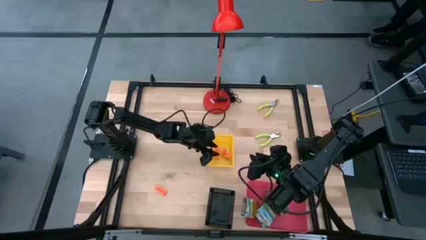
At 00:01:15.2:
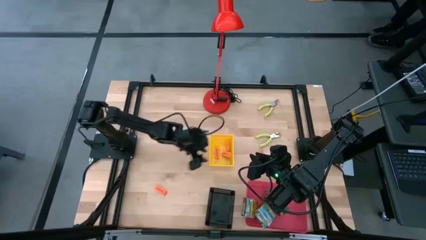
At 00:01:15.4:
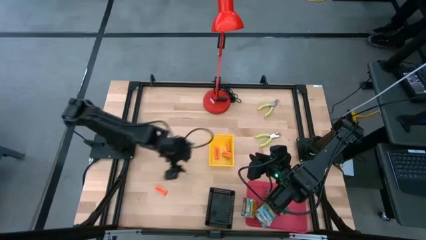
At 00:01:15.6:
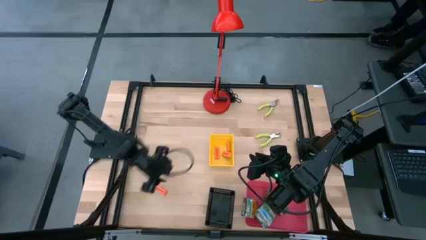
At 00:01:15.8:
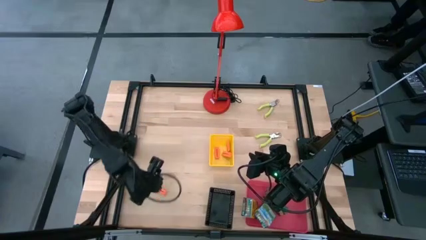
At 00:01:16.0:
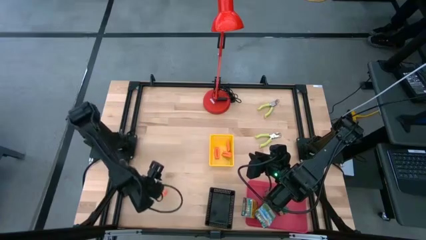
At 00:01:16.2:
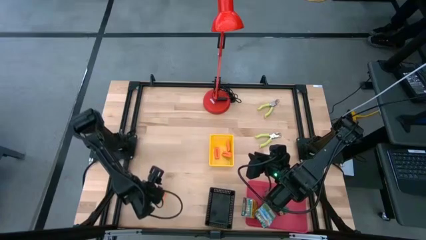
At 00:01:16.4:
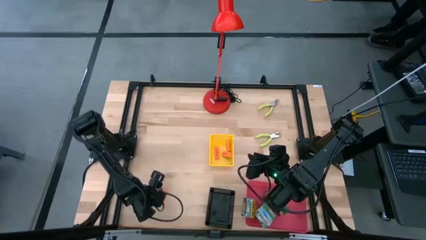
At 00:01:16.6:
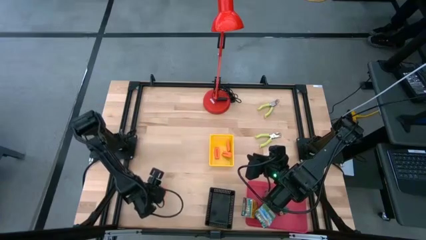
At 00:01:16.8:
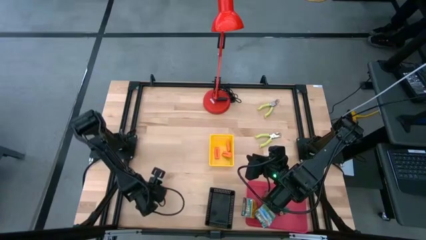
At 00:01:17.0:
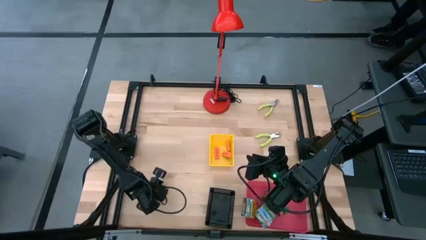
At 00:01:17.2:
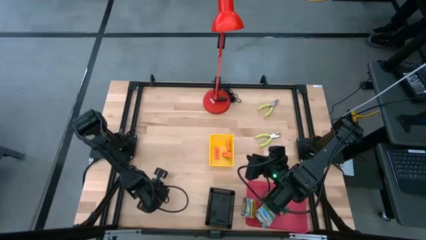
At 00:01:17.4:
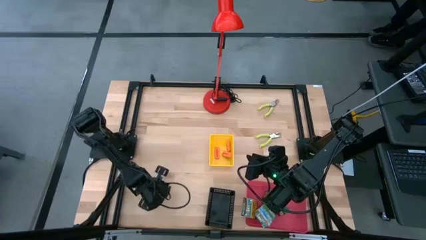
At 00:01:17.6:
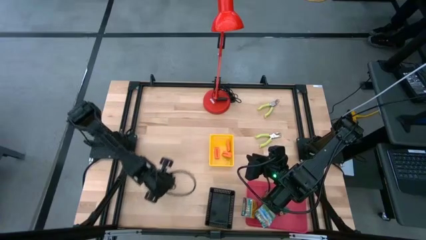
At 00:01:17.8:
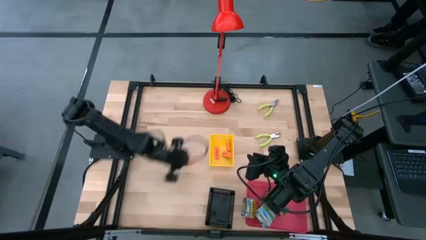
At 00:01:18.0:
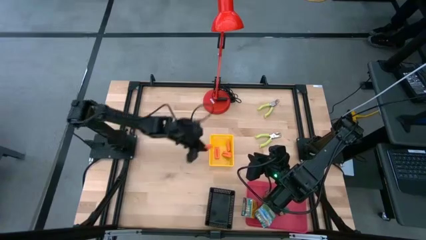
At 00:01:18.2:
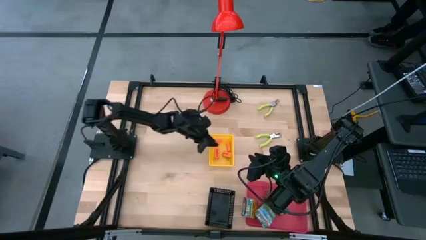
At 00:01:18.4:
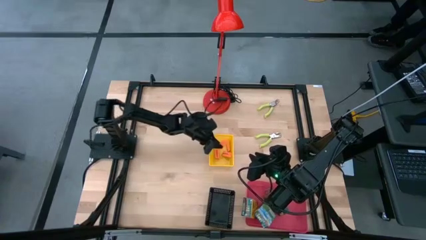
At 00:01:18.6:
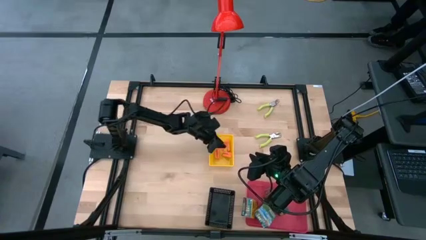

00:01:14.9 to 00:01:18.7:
Task: Pick & Place School Supplies
Put the orange eraser into the yellow bin

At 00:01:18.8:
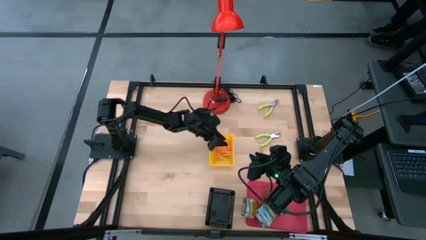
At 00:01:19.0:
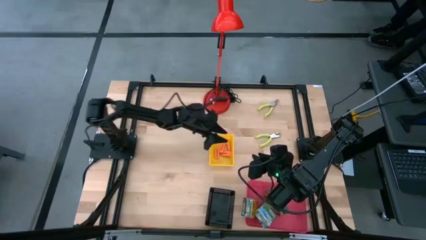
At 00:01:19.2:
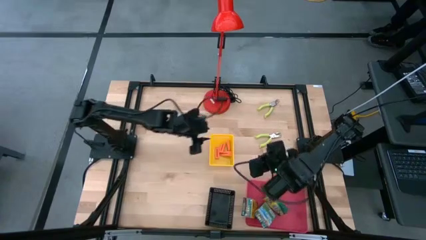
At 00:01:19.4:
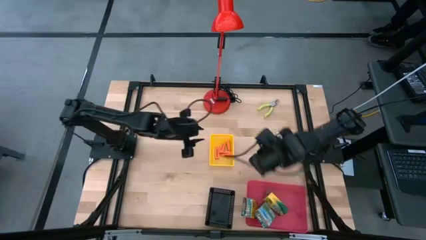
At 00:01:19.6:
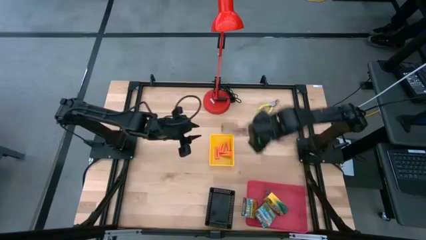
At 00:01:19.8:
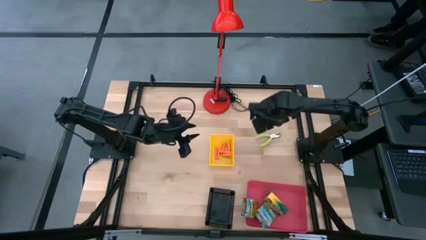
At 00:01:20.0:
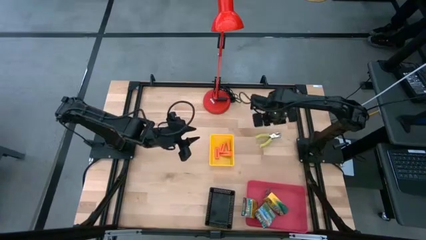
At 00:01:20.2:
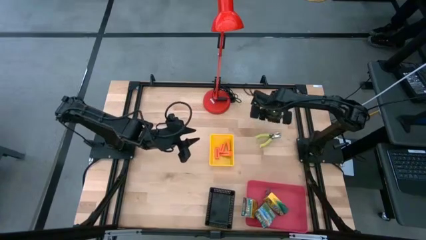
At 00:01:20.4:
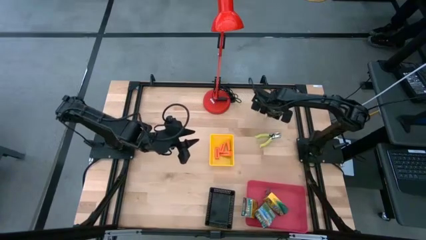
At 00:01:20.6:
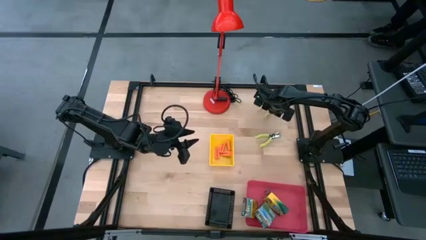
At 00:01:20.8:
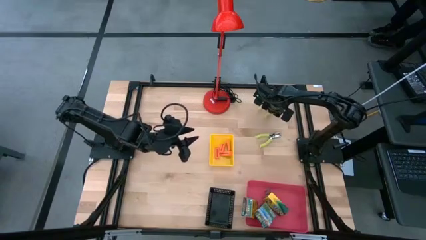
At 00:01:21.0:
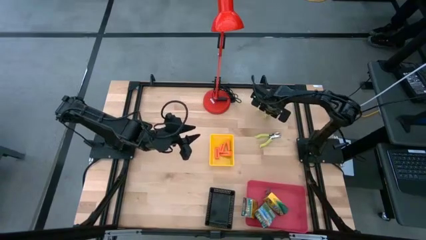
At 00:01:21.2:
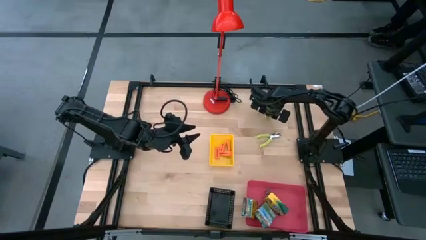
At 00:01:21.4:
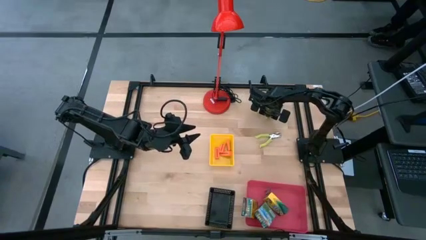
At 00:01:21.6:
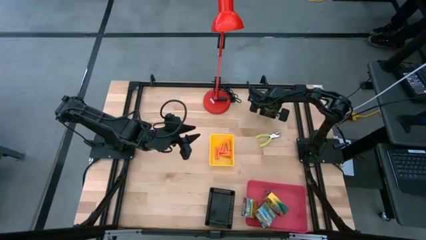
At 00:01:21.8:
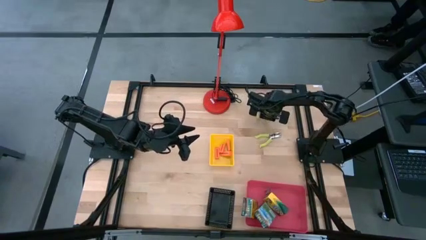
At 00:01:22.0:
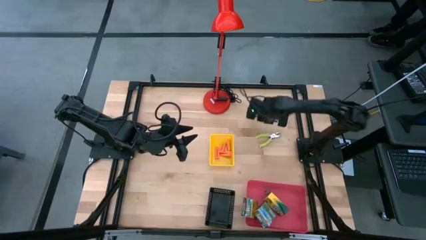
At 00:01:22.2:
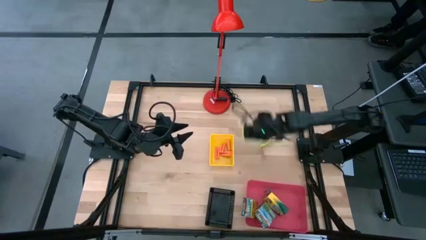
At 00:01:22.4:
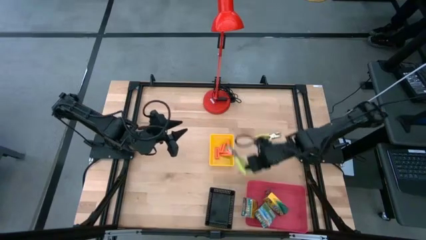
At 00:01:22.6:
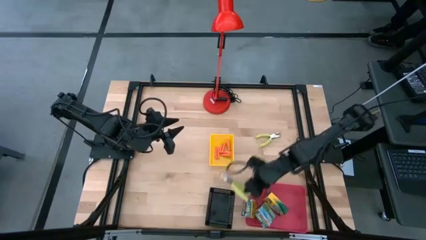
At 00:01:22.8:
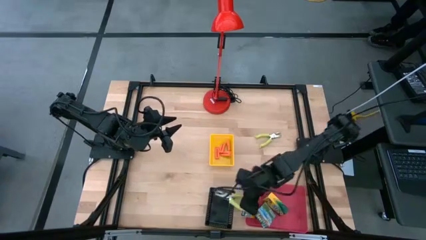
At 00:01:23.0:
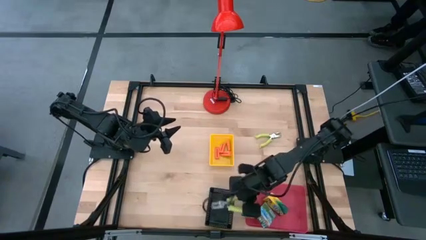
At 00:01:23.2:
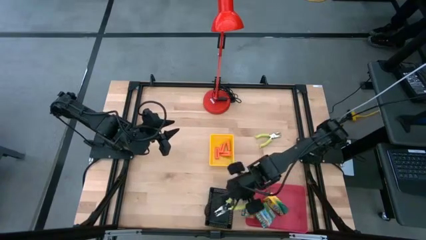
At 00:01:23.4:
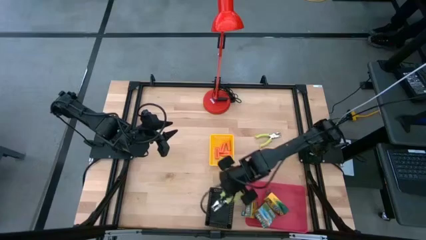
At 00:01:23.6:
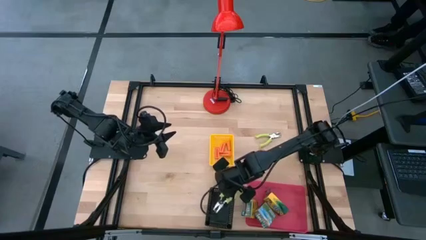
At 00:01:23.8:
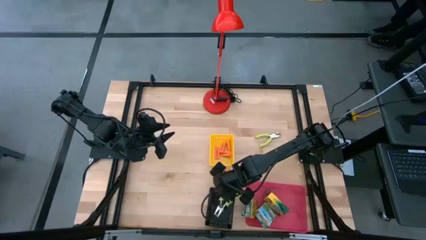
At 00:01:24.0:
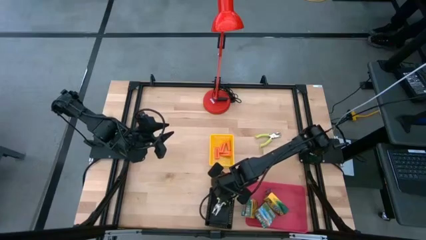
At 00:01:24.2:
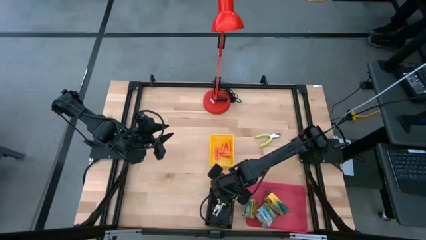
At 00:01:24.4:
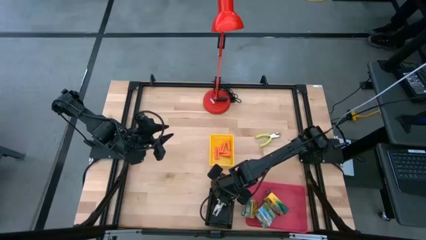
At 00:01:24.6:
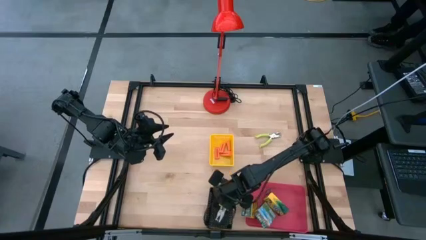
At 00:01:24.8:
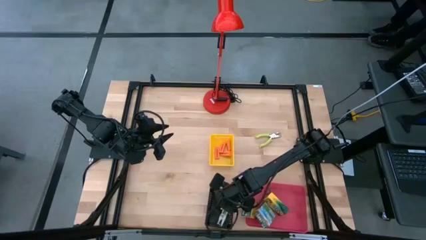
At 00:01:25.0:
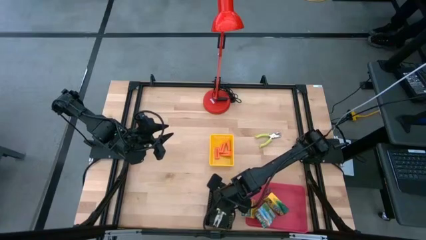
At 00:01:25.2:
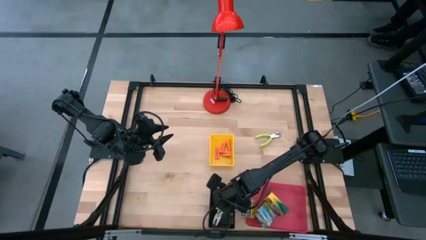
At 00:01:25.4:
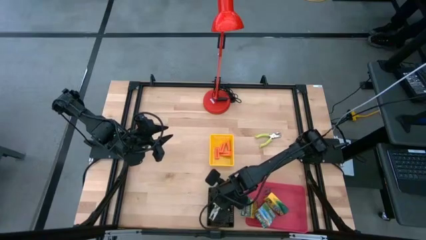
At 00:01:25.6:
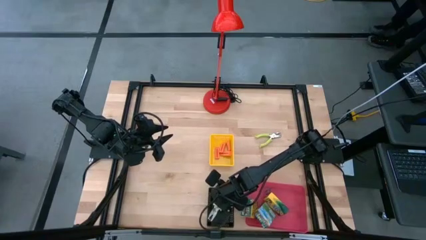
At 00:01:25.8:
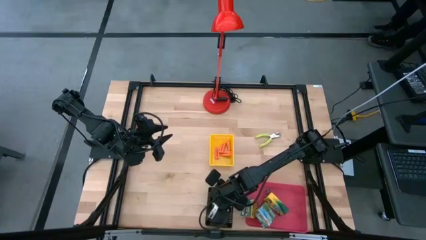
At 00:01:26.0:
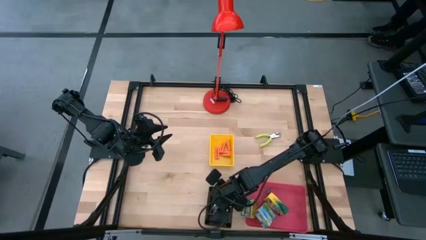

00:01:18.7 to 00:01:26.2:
Put the green hole puncher into the black bin
